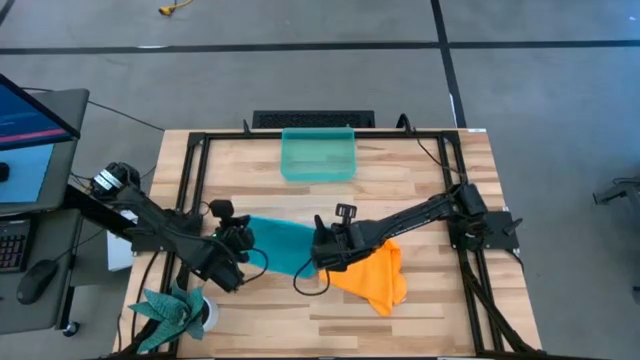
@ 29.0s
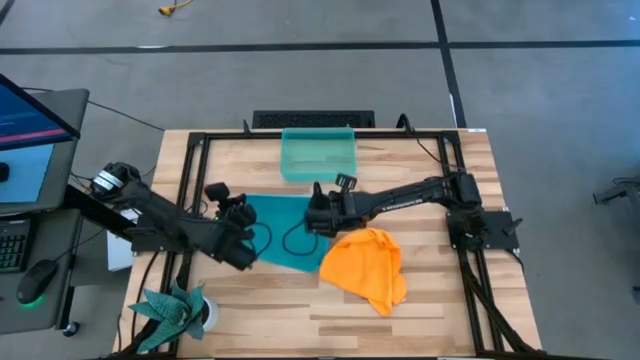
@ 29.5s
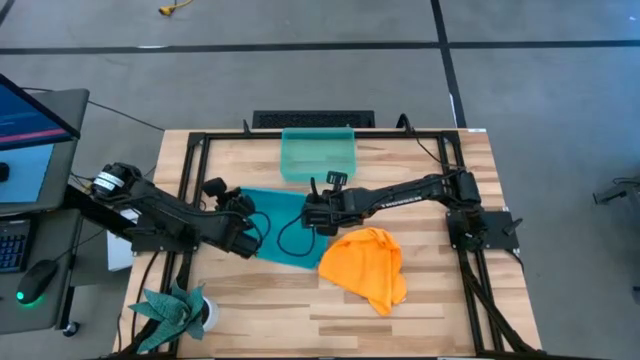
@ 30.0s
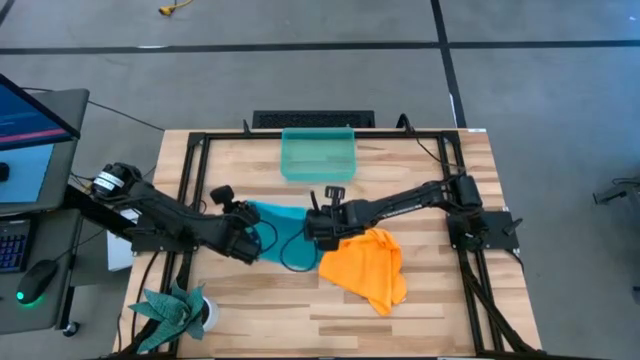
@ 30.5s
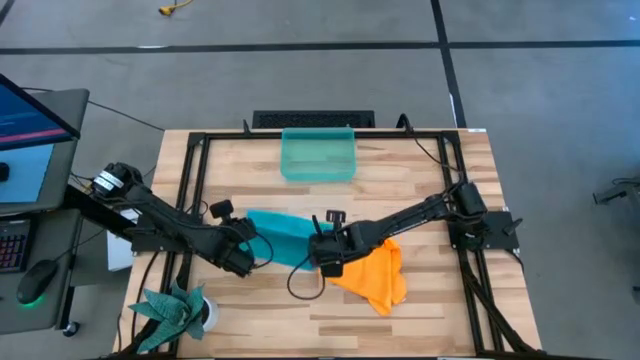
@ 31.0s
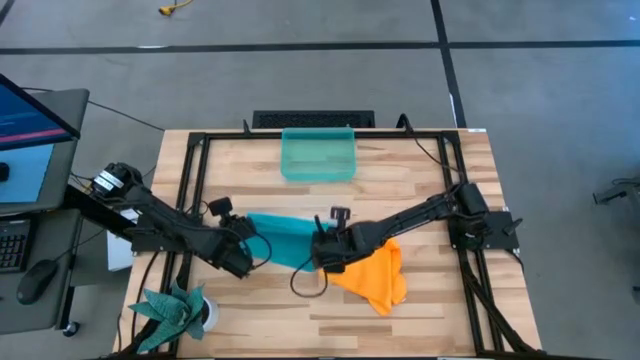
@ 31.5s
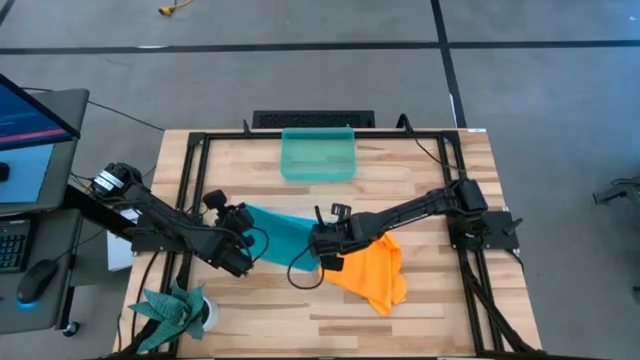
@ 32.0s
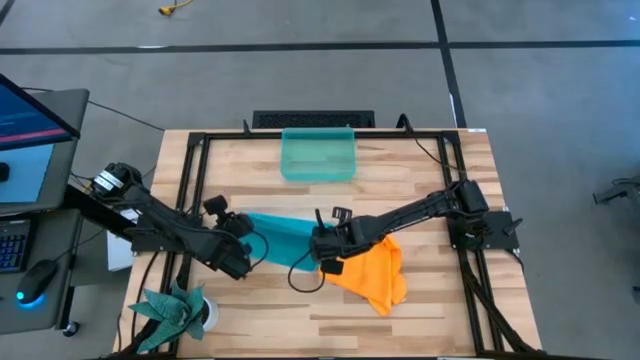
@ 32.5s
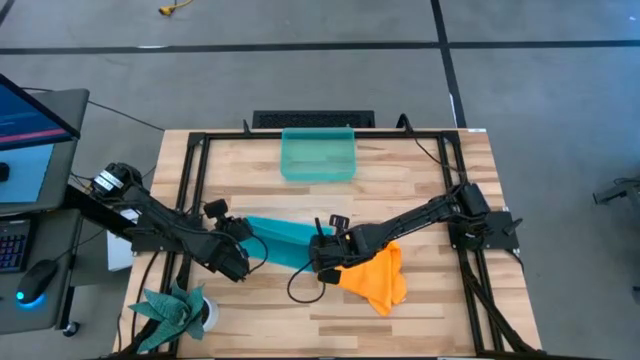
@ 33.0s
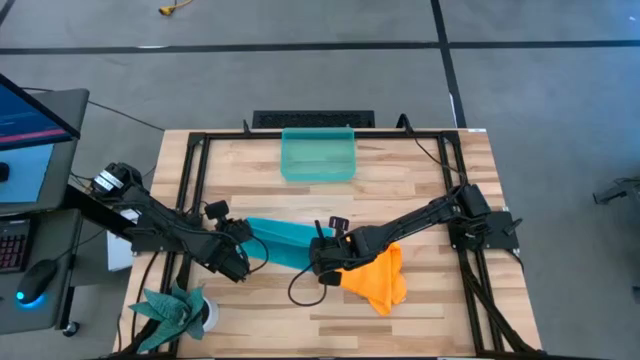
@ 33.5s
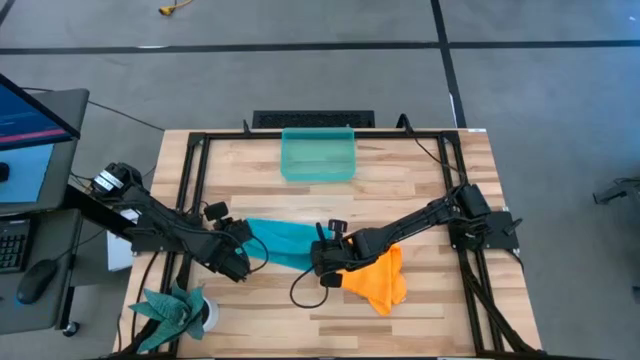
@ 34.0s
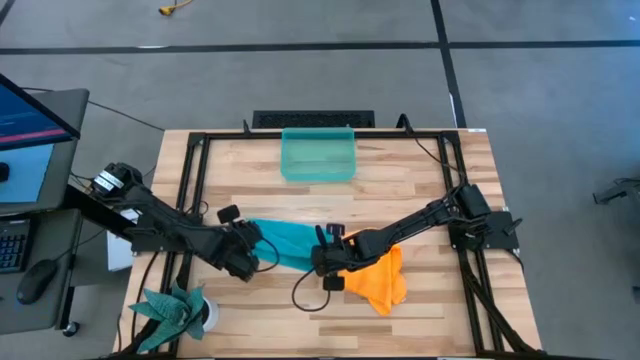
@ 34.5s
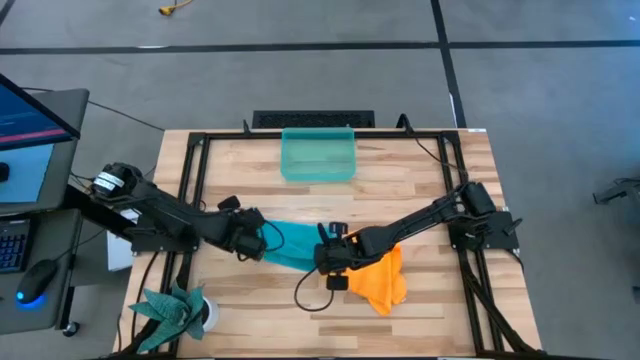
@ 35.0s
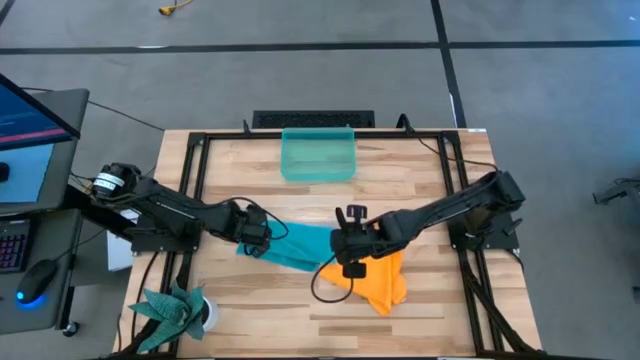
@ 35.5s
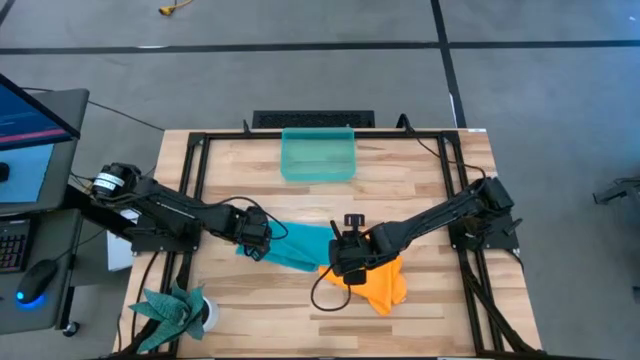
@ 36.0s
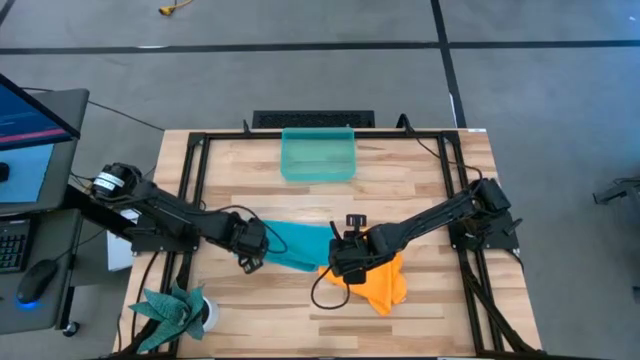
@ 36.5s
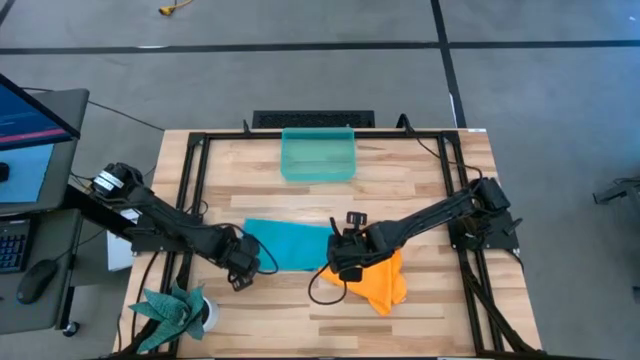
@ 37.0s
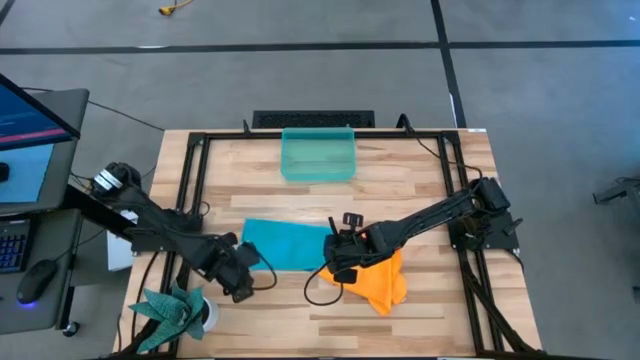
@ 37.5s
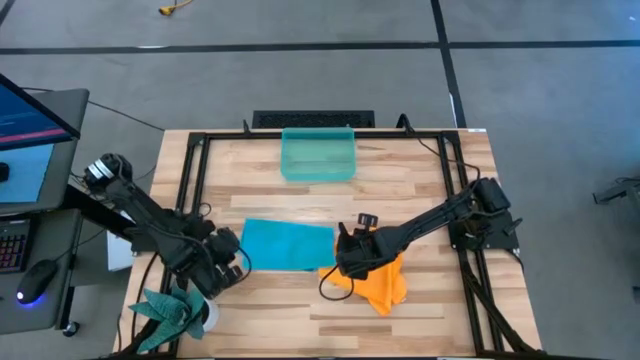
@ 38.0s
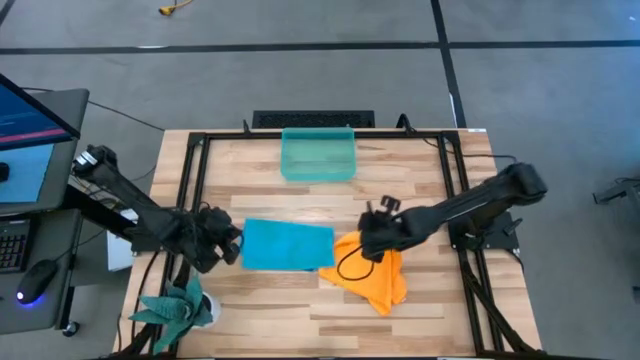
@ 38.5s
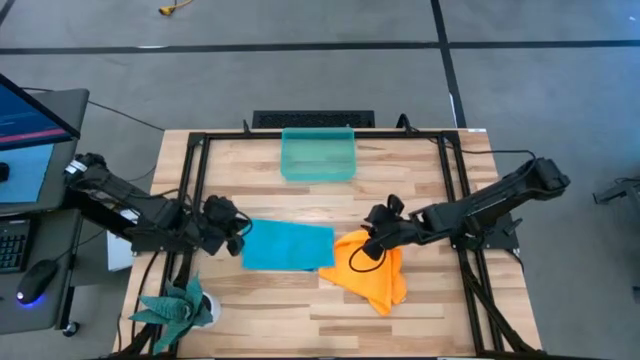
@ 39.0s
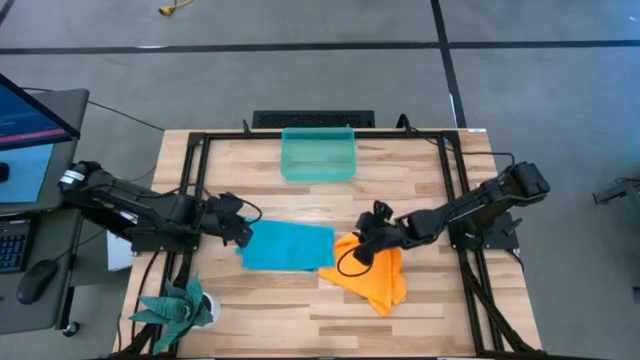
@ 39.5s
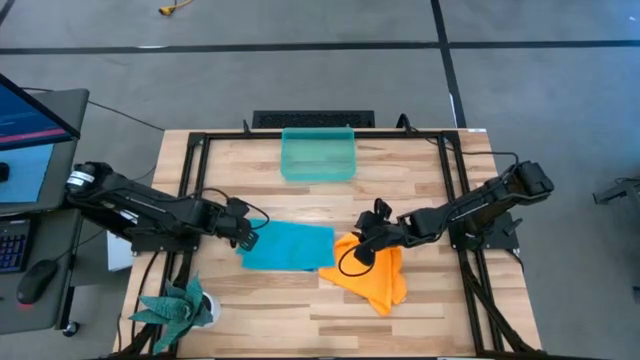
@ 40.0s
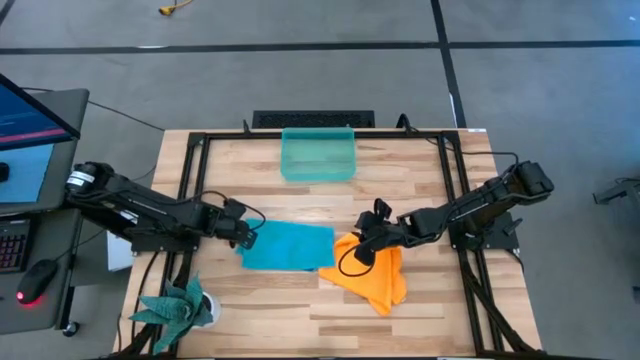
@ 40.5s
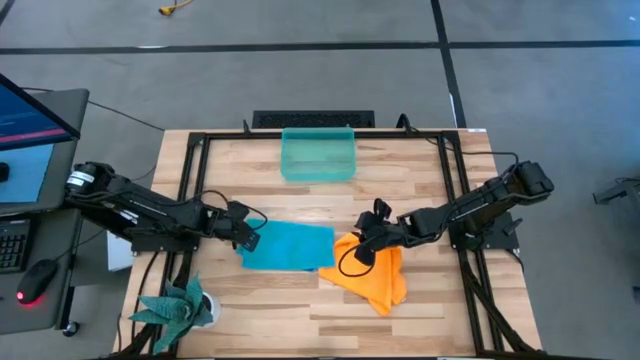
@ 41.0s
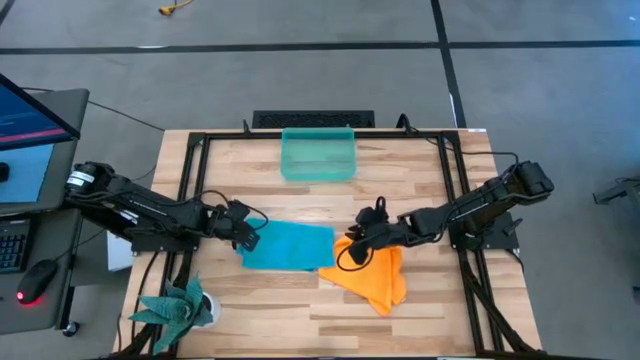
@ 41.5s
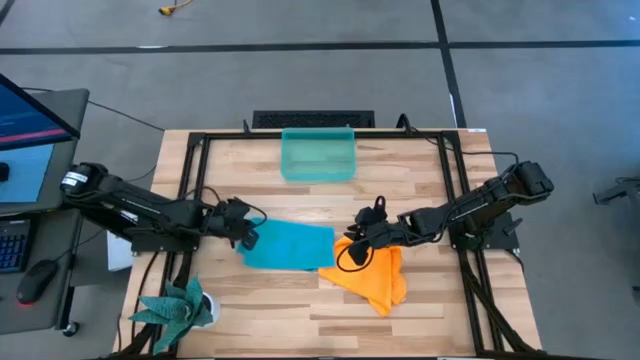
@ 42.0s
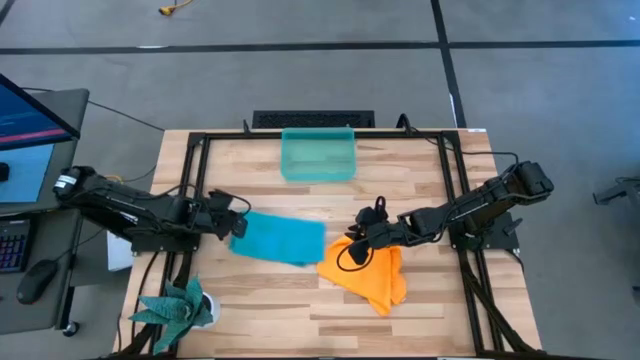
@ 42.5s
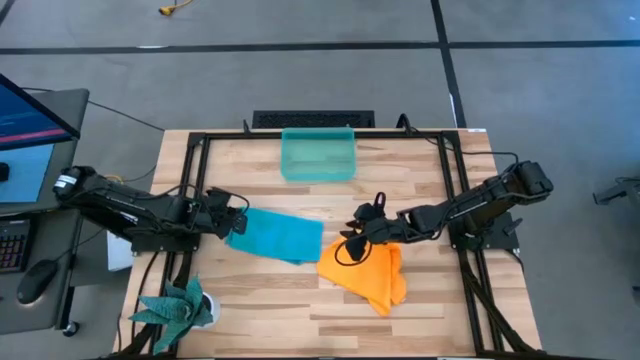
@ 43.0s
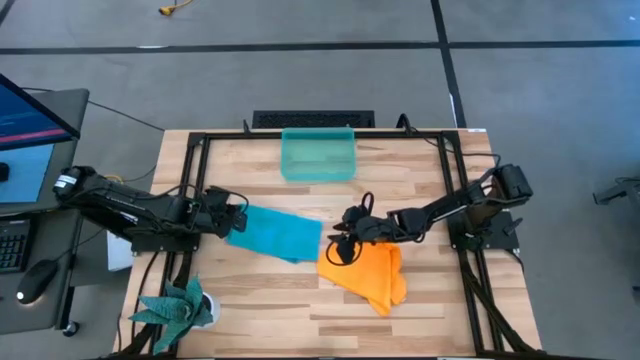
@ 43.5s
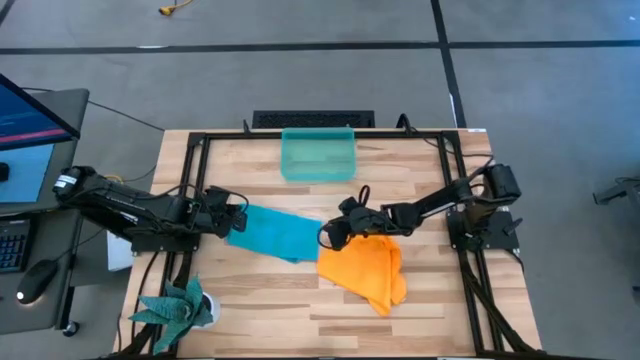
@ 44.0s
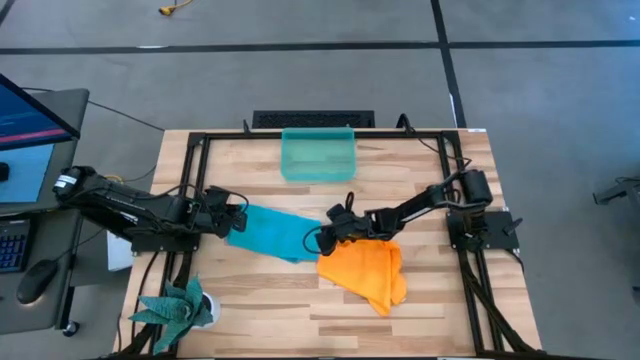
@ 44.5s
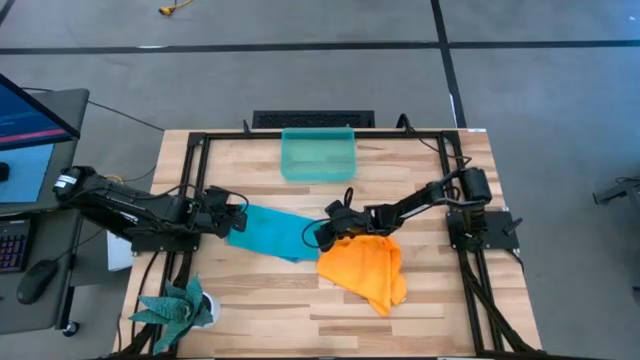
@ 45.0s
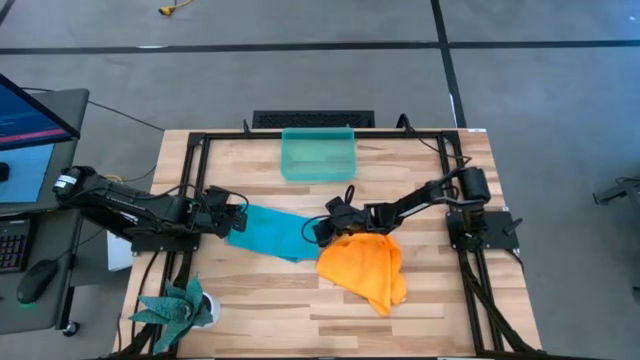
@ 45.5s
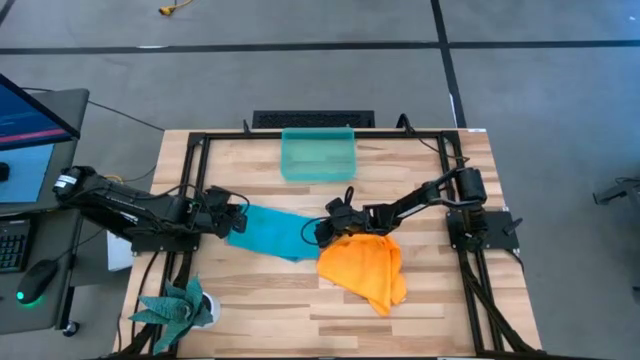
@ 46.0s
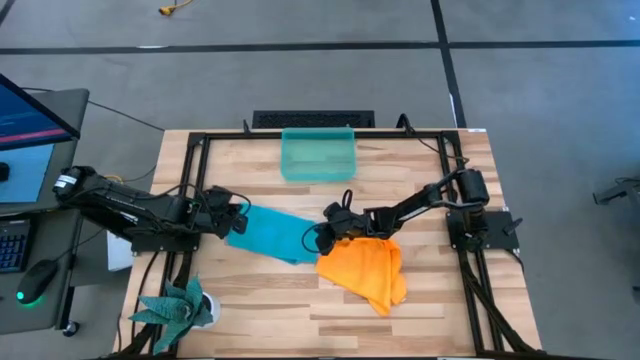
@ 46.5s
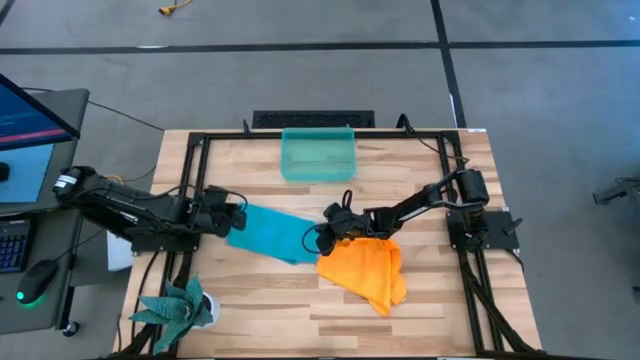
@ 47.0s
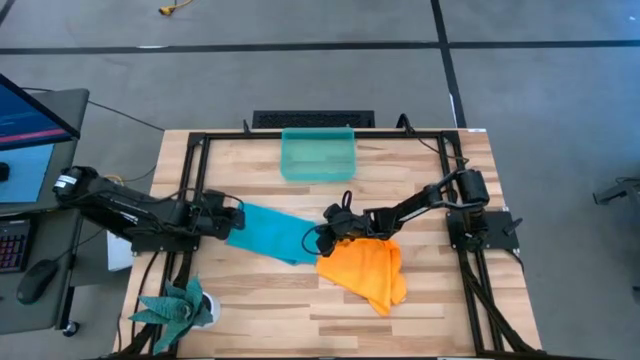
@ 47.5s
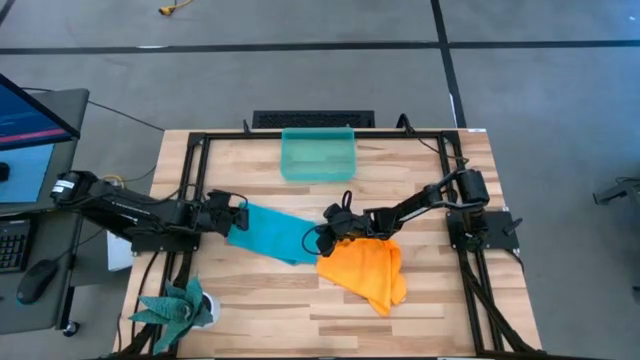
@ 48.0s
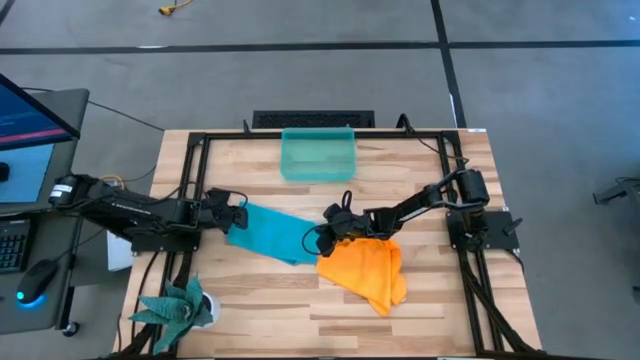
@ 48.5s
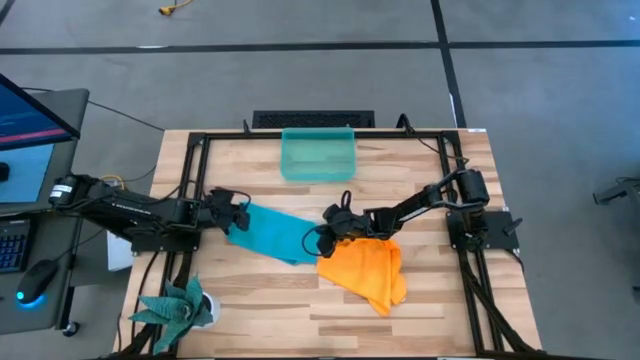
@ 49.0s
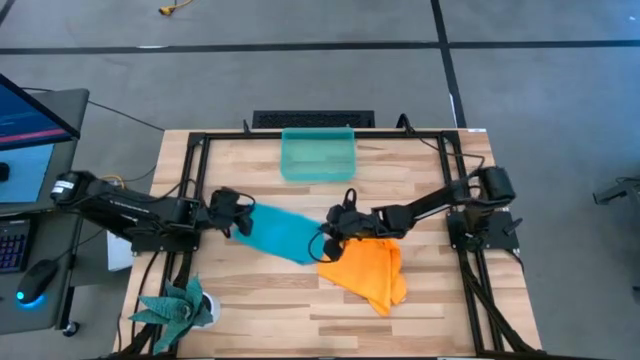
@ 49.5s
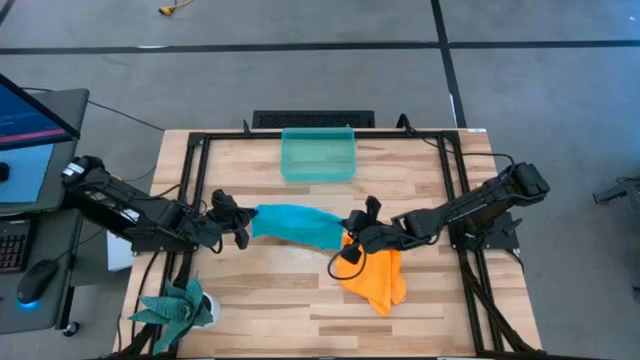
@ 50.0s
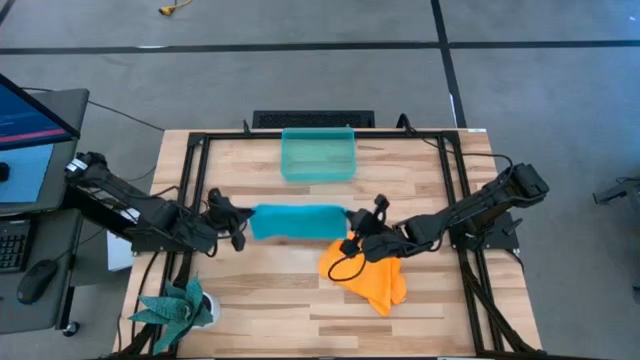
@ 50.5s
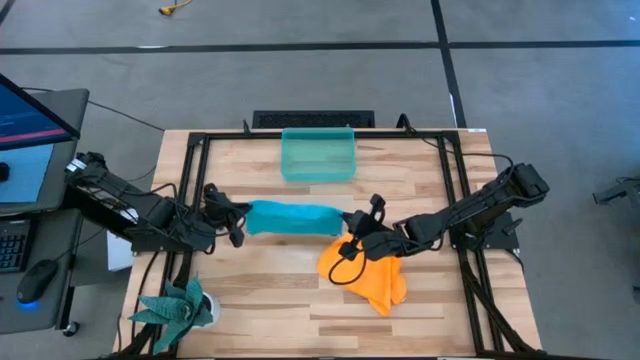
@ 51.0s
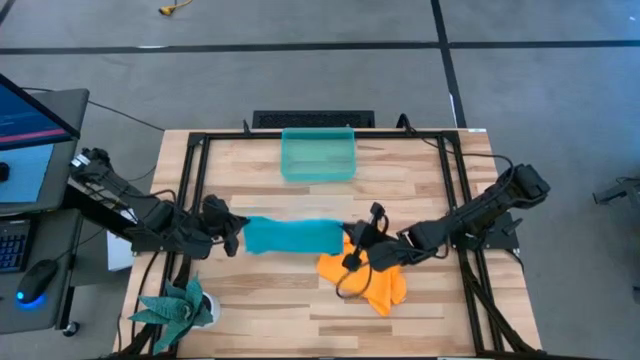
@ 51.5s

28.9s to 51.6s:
Task: Roll microfiber towels into tight, uniform cylinder then place into a basket
Fold the blue microfiber cloth
